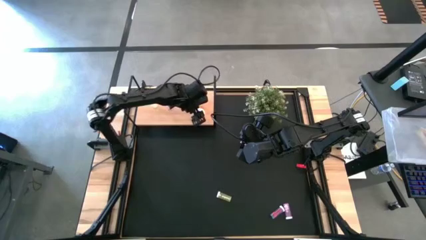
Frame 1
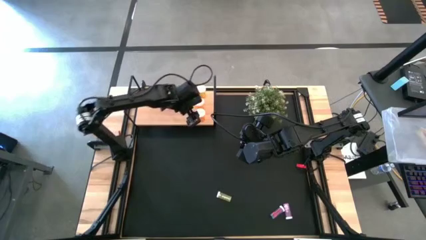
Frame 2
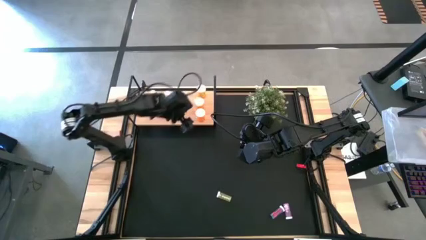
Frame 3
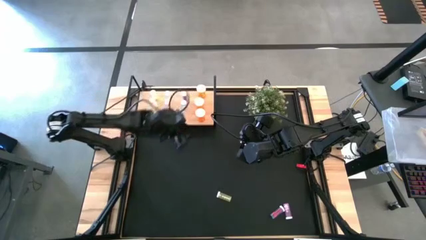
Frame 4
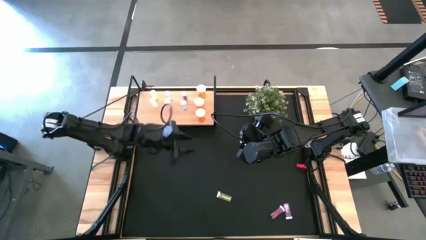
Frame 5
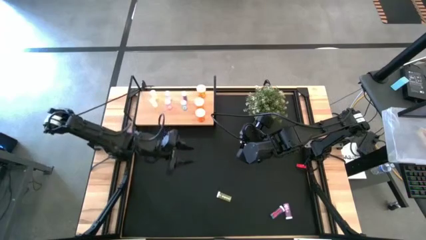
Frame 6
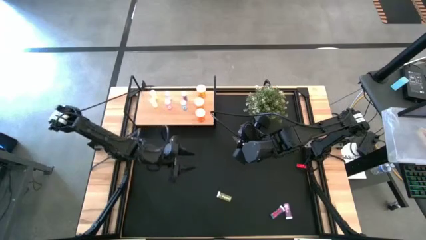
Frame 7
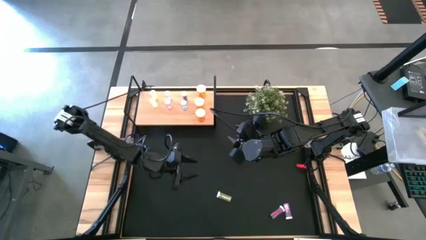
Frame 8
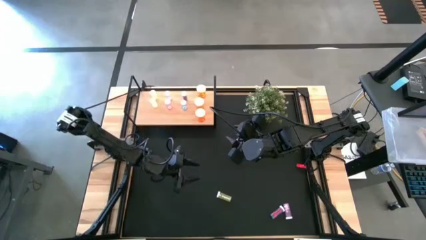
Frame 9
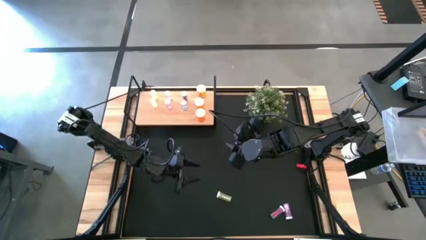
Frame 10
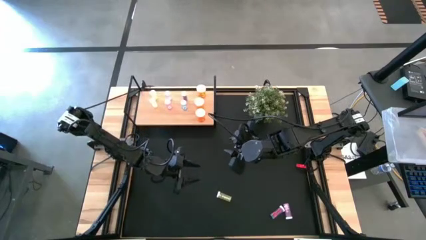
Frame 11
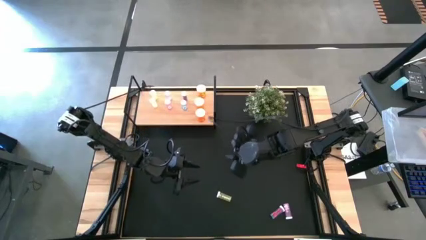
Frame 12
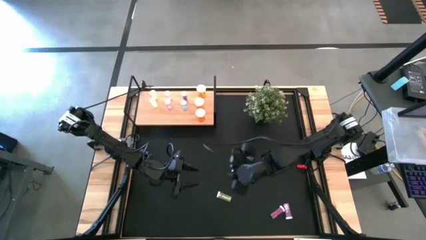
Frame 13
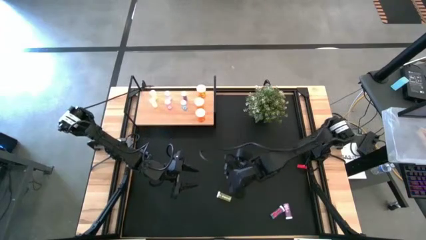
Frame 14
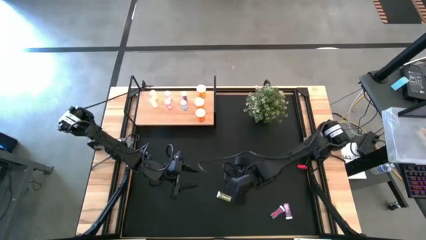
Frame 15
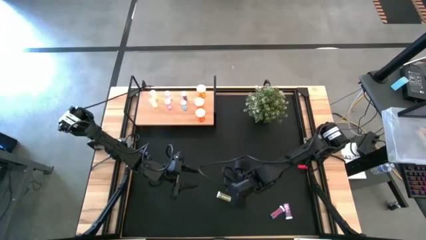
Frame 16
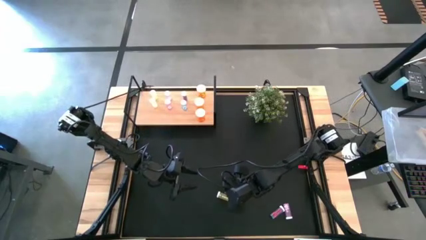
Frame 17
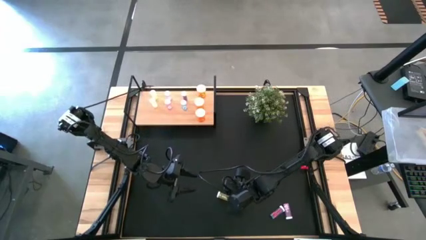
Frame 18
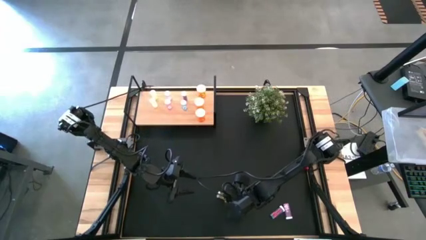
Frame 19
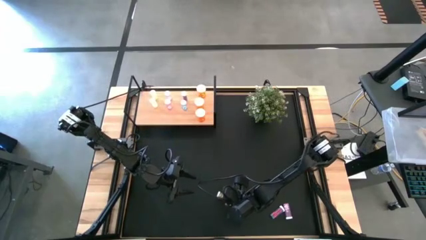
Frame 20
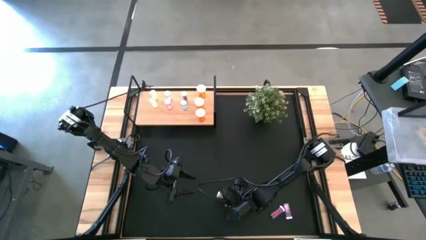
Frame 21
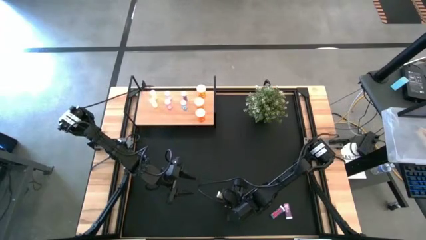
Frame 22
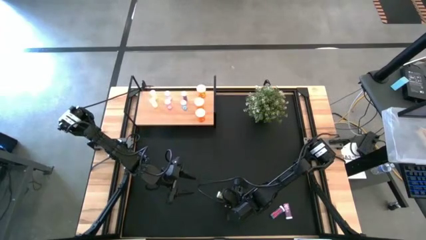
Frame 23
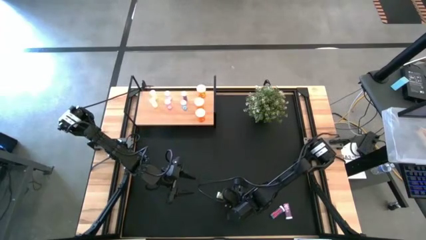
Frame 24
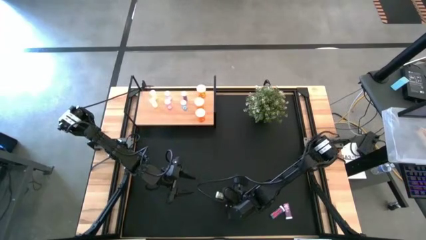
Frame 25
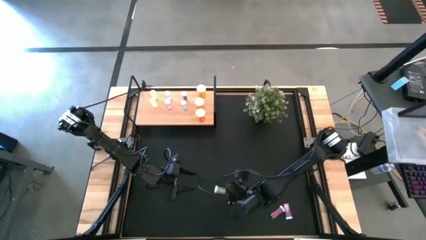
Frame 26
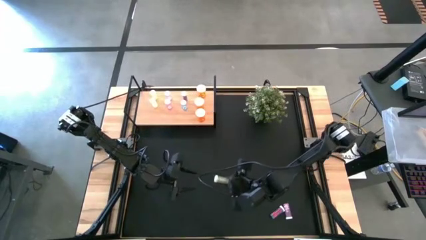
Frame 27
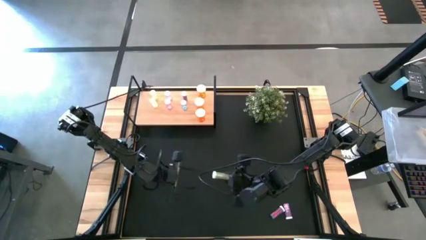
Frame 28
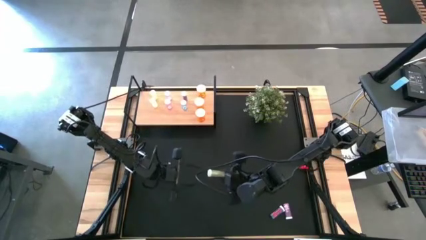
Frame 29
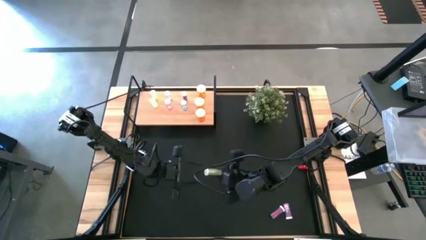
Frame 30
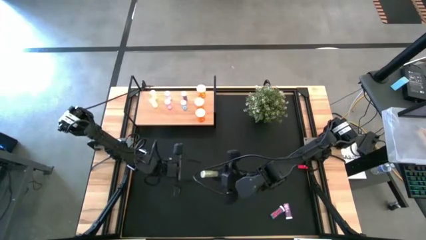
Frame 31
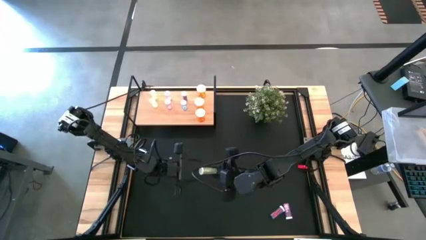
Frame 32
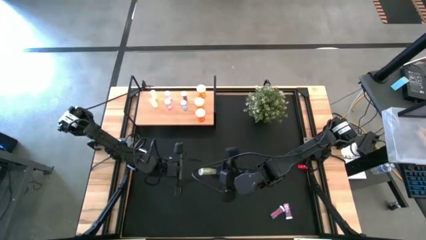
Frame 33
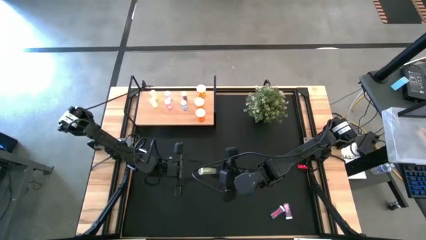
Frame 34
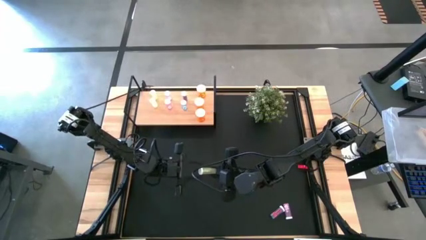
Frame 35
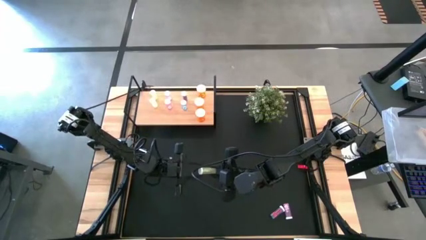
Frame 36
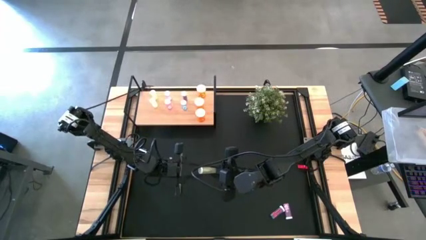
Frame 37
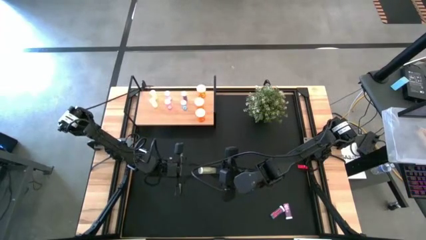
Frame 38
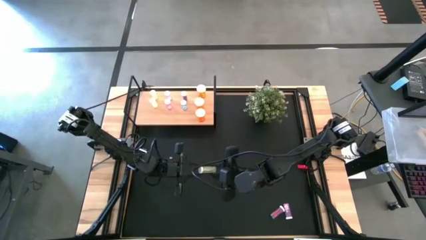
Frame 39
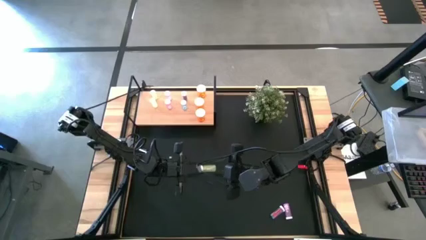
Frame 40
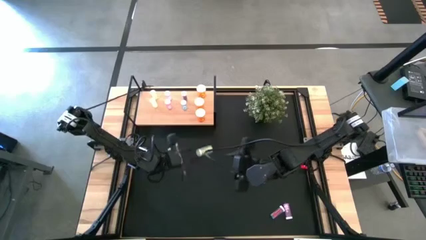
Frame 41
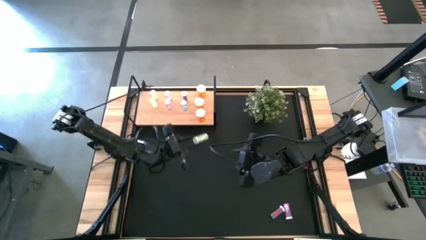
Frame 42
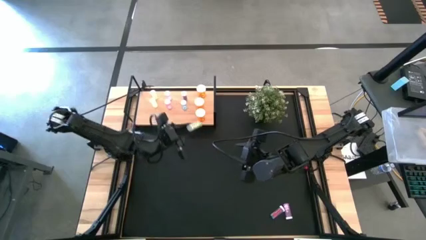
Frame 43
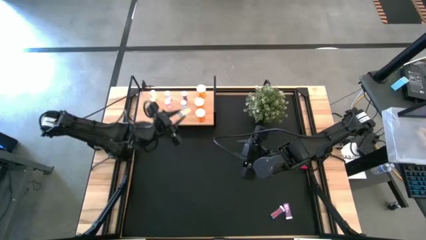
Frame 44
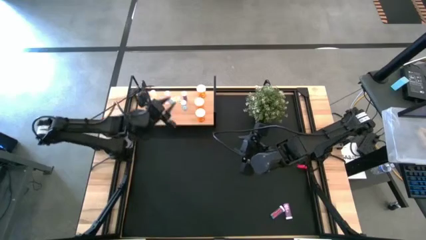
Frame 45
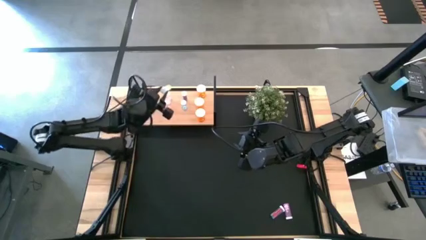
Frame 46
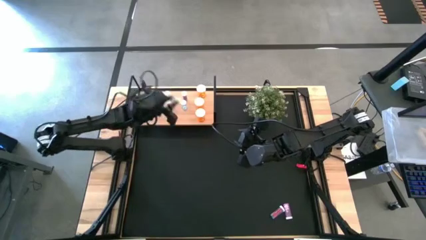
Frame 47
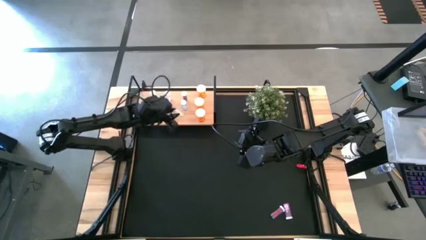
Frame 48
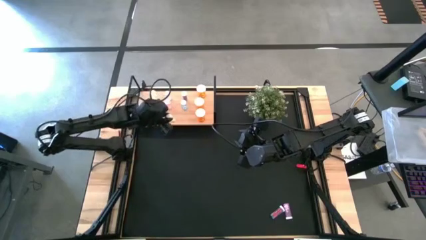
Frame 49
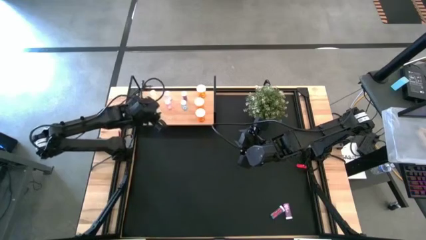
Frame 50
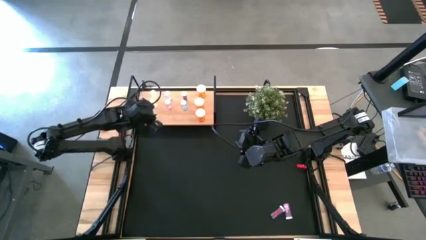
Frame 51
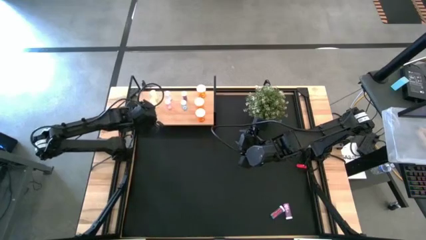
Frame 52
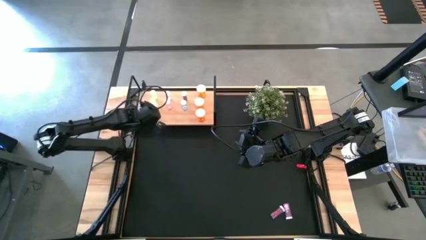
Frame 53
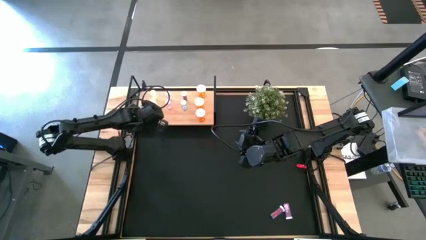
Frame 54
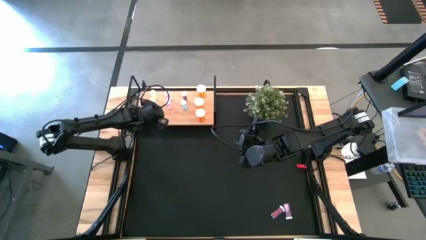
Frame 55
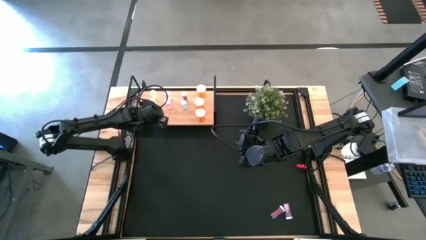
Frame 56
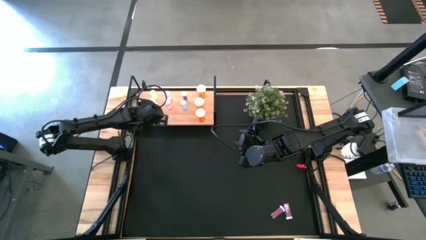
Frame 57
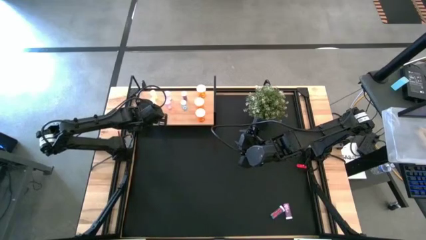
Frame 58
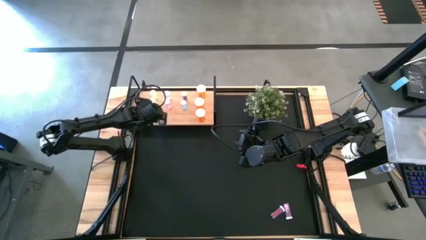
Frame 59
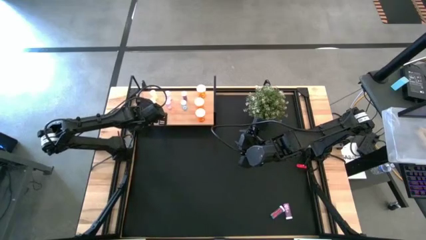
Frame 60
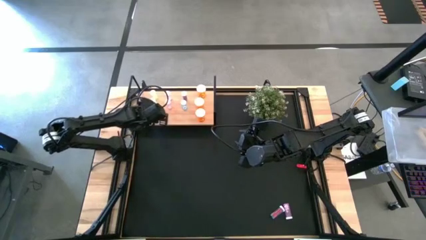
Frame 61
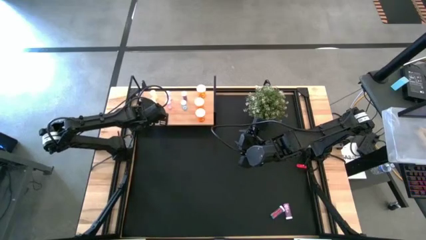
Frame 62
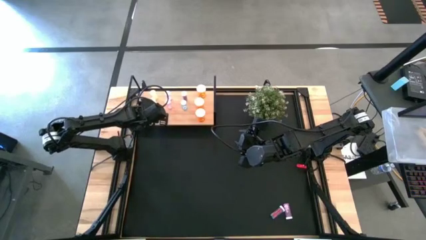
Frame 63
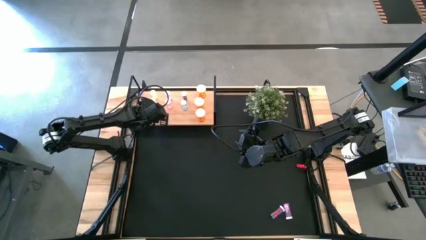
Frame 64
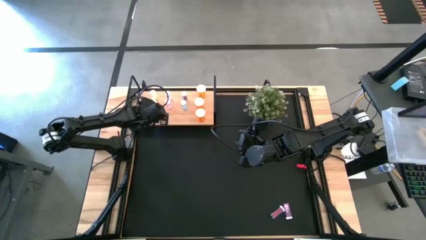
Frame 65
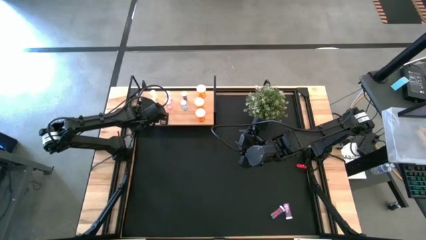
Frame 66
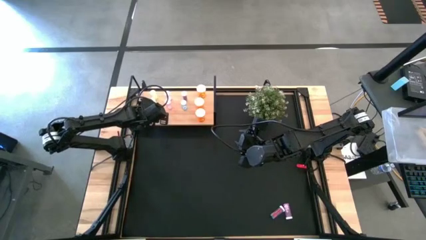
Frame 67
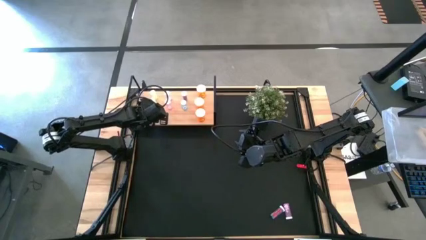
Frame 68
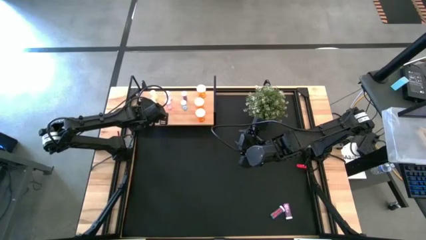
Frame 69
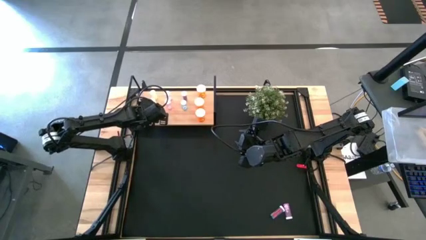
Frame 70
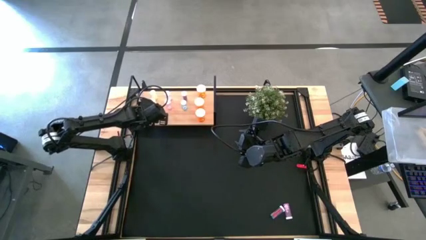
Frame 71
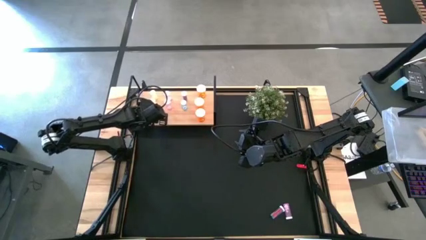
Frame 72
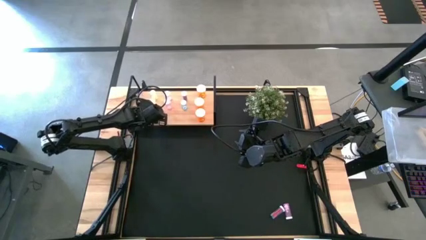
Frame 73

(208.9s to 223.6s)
Task: Pick and place medicine bottles onto shelf by color
Put the yellow medicine bottle on the shelf aligned with the other yellow medicine bottles

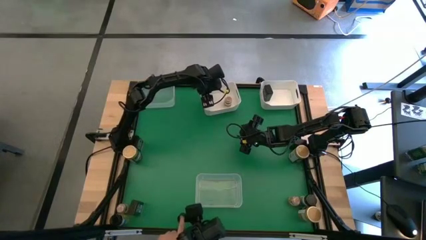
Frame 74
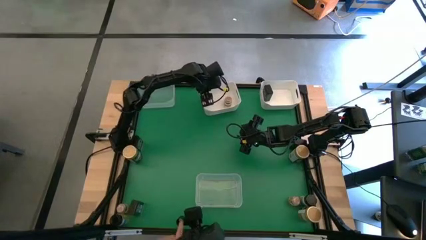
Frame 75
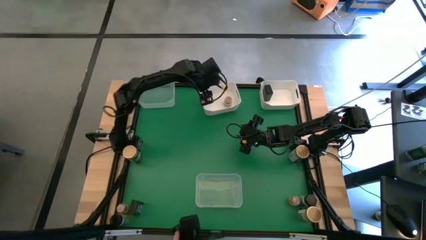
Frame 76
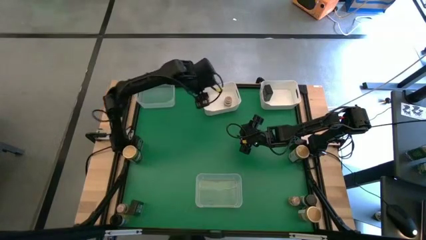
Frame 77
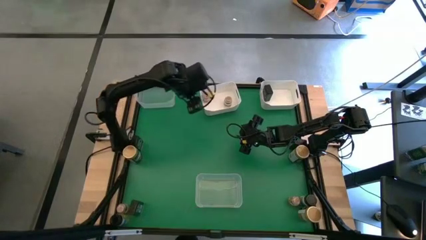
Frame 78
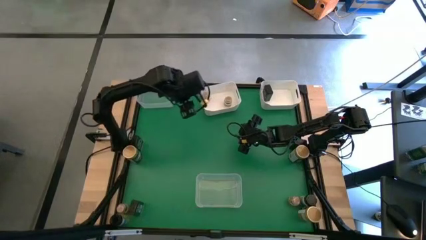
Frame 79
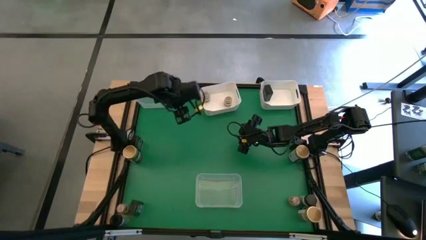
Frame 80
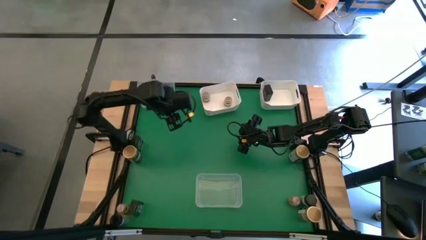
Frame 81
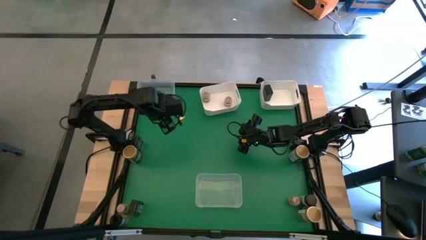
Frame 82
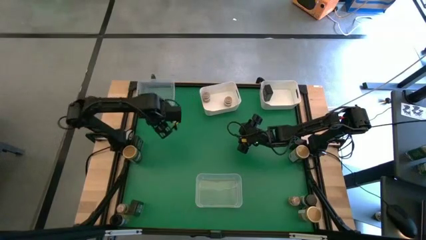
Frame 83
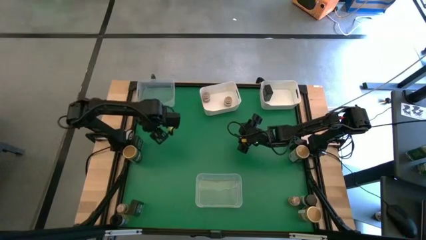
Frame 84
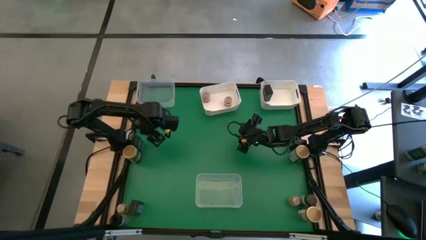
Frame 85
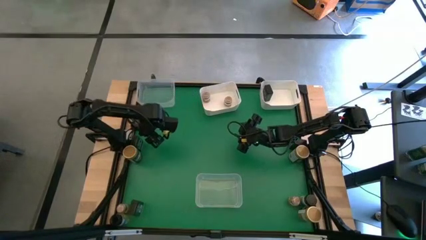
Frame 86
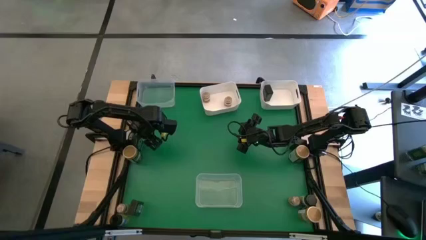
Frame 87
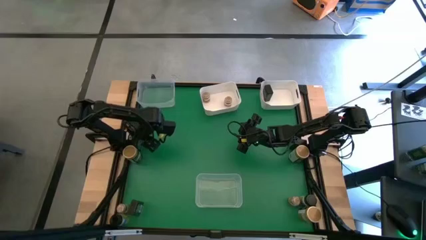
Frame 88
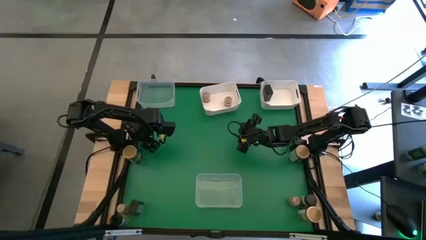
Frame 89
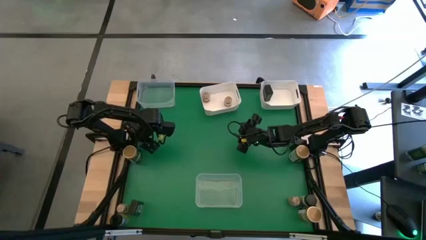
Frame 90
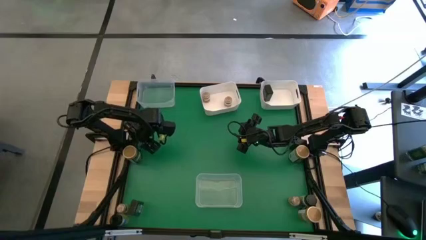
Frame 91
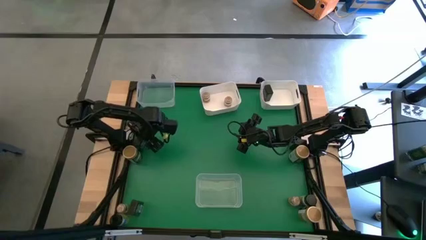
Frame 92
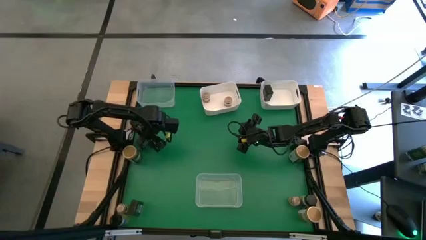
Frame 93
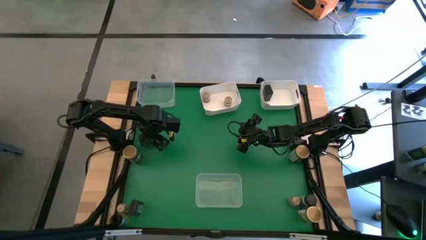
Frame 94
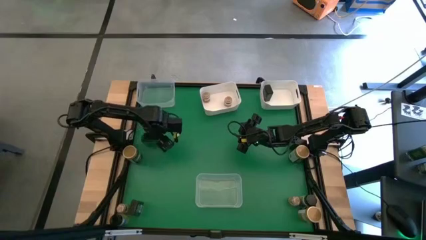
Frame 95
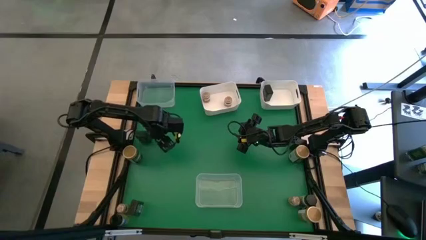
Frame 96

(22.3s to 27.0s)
Task: Sort spices by type
Put the green seasoning can into the right white bin
